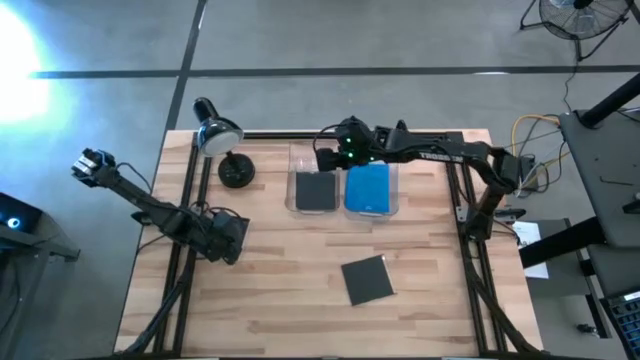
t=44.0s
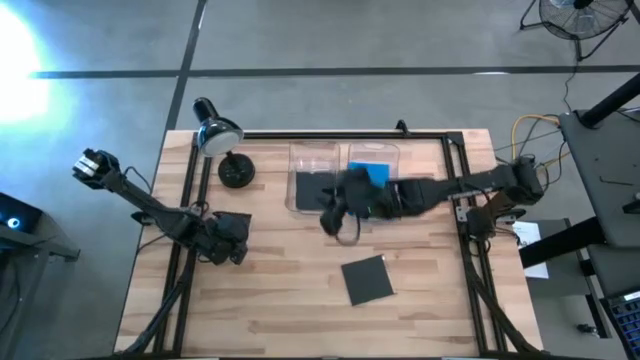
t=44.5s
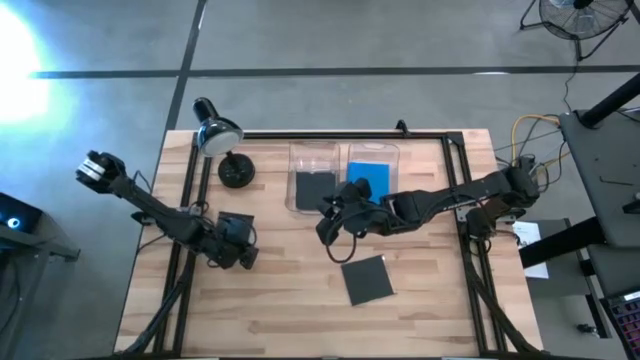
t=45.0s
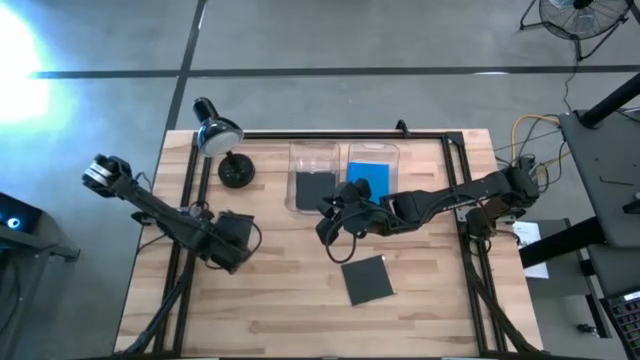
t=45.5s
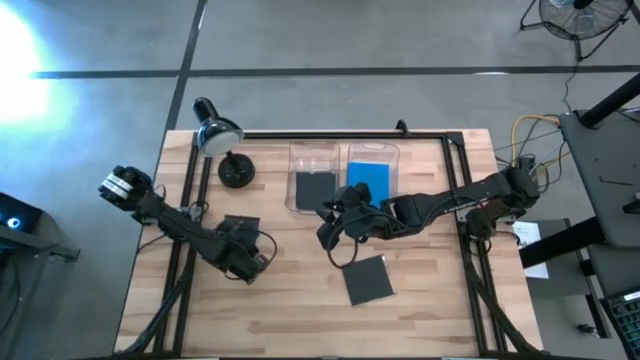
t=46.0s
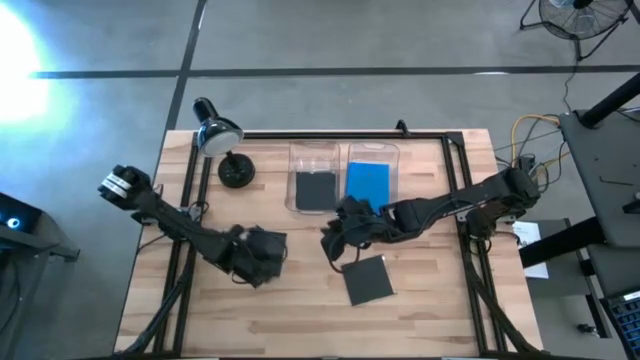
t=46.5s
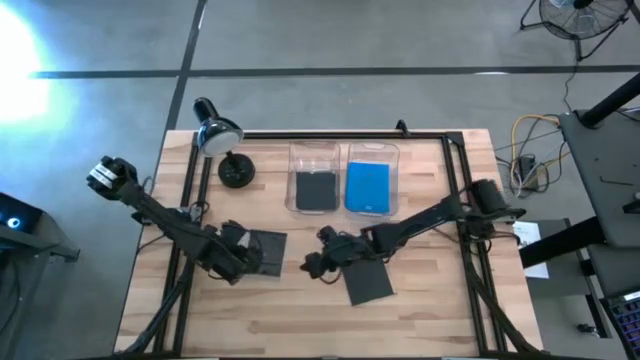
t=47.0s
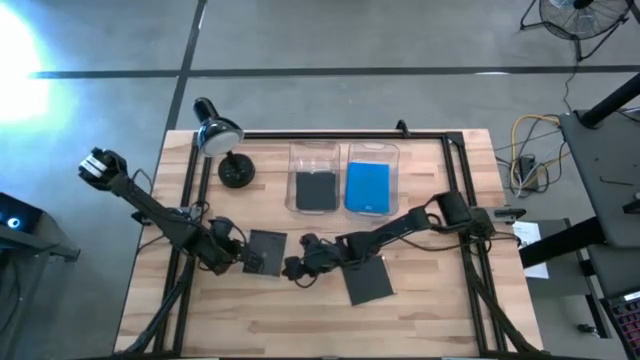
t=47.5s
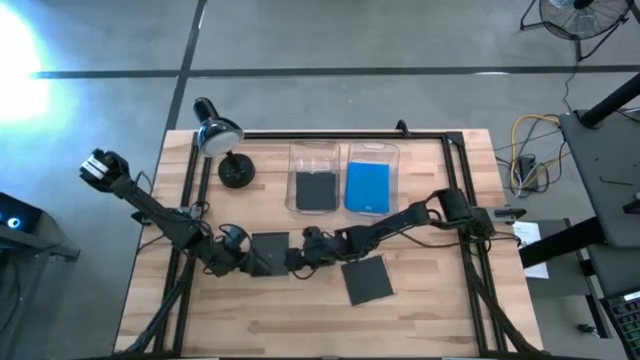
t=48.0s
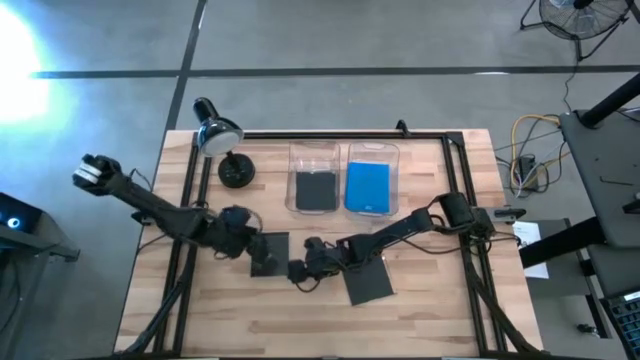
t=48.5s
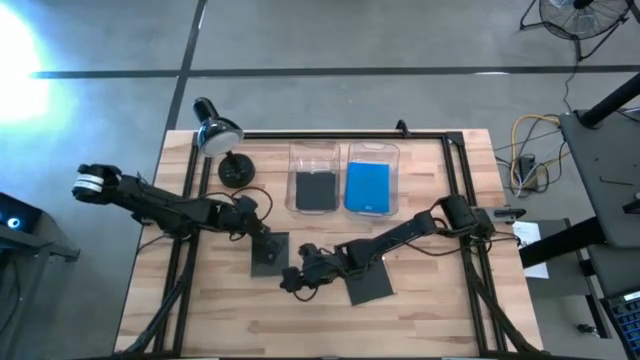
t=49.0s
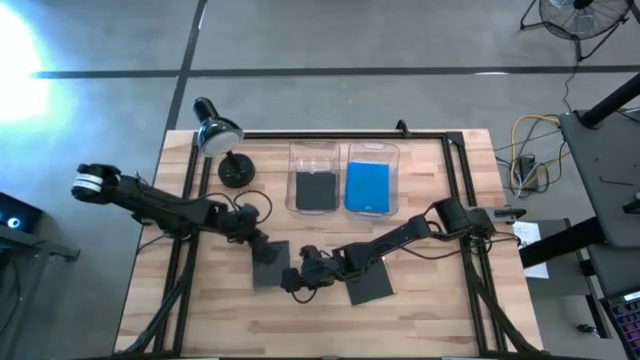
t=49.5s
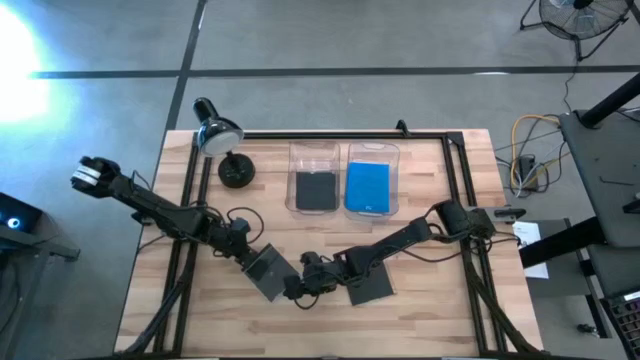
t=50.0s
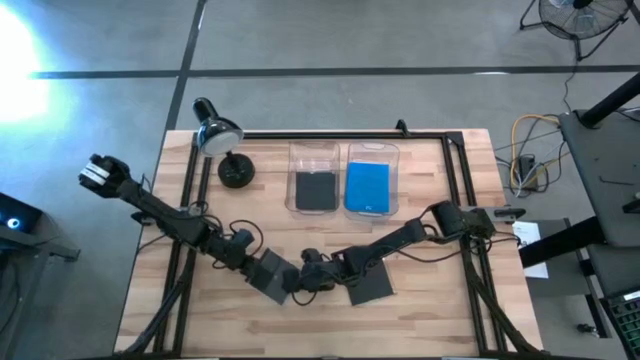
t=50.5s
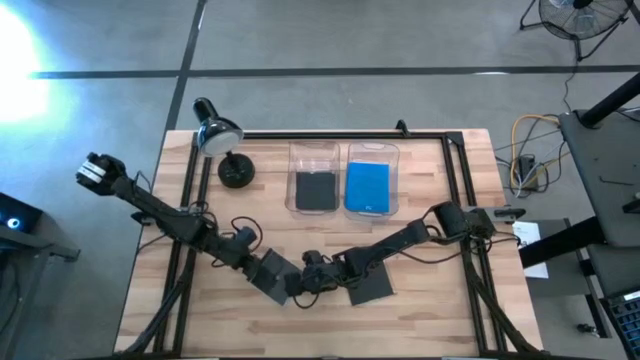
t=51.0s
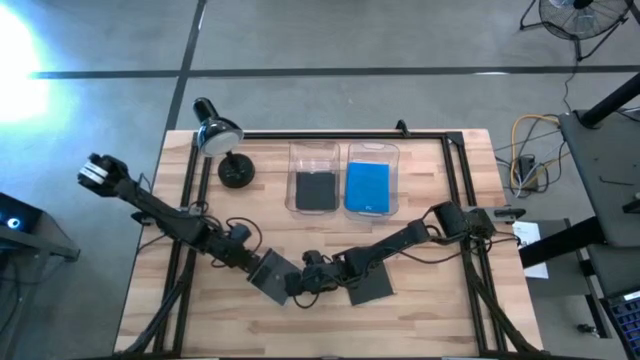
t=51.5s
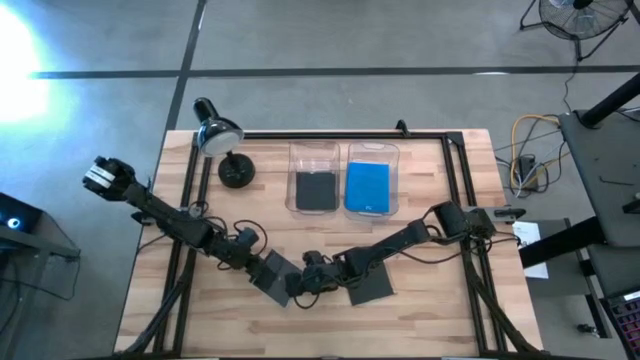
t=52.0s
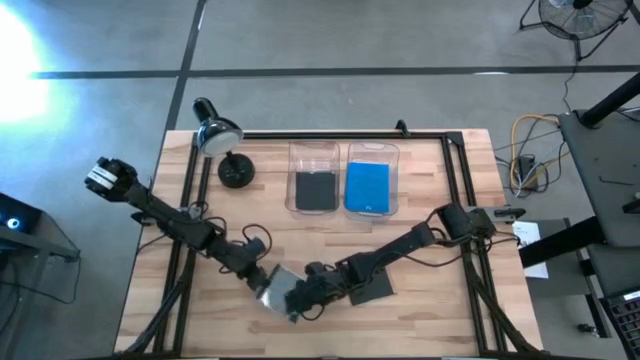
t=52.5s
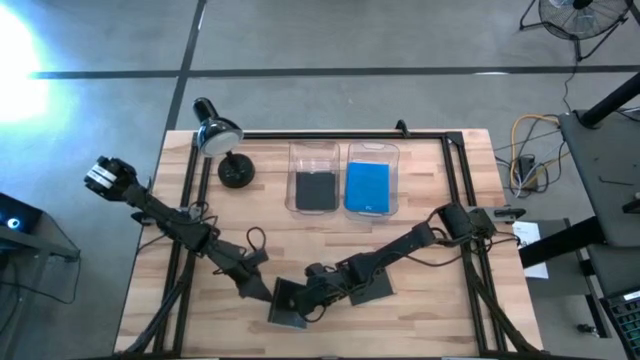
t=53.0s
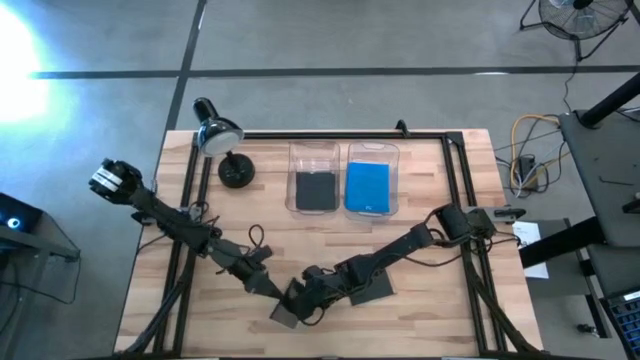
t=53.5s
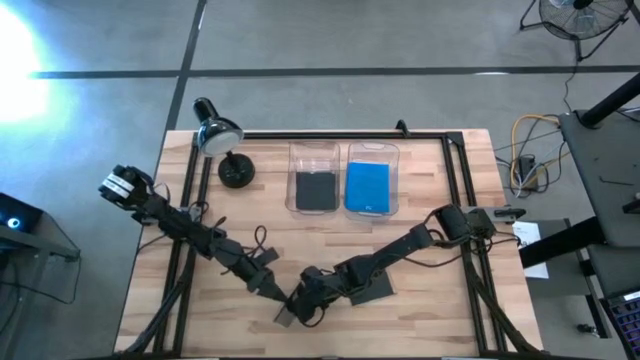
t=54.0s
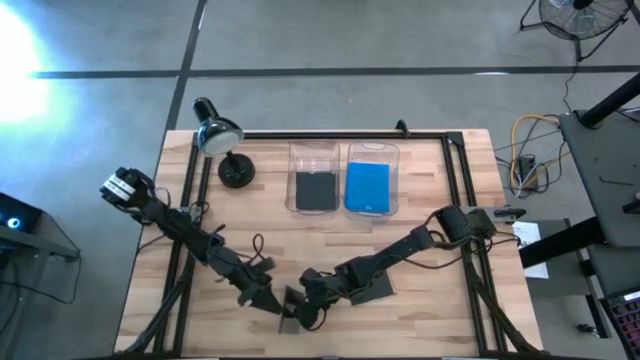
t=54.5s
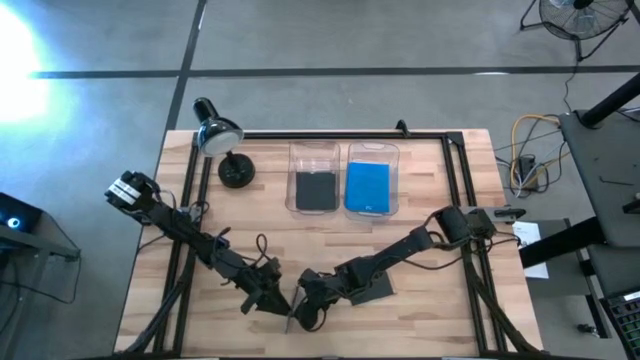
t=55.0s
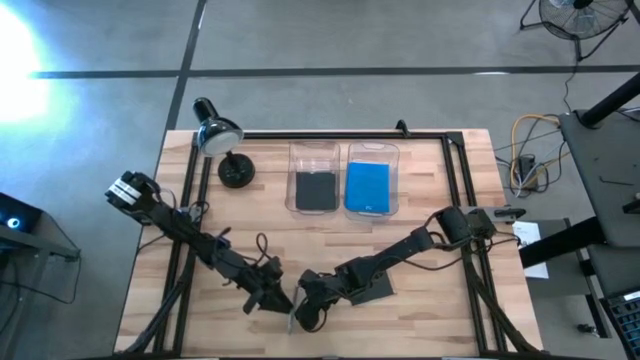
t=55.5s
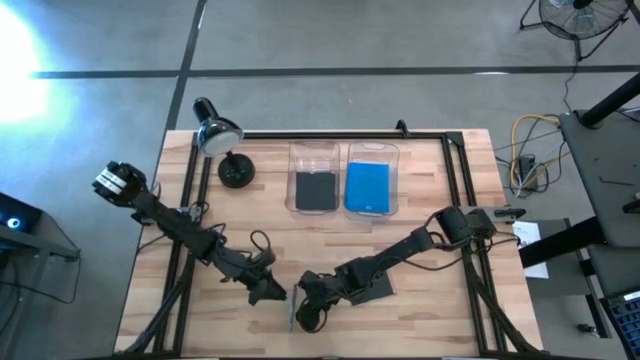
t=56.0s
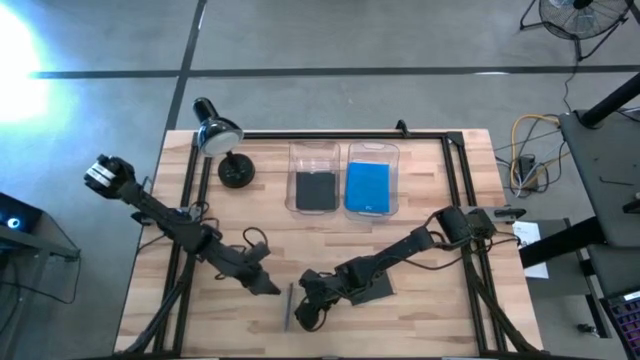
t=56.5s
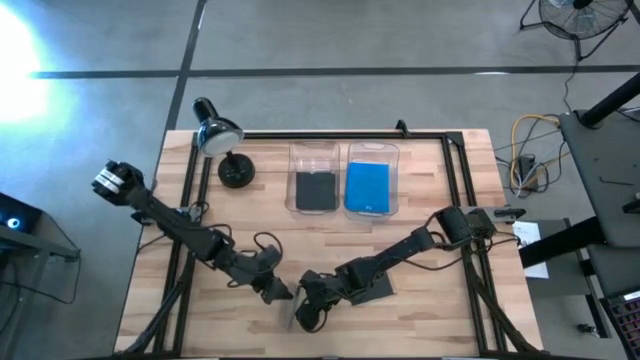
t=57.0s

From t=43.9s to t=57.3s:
Task: Pick & place jewel cases by type
Put the black CD case into the left transparent bin

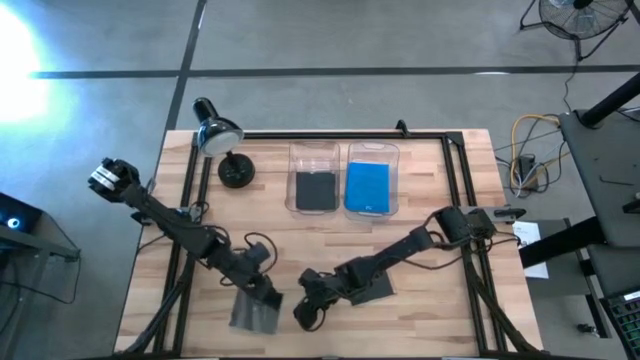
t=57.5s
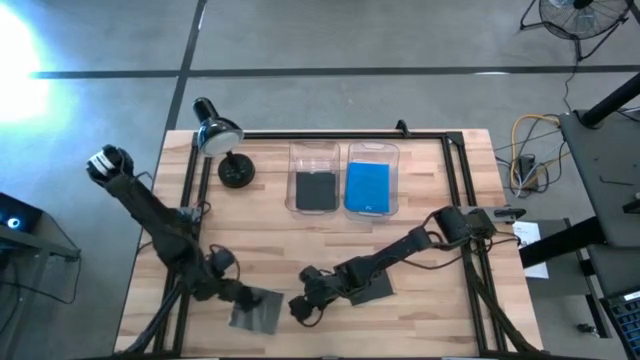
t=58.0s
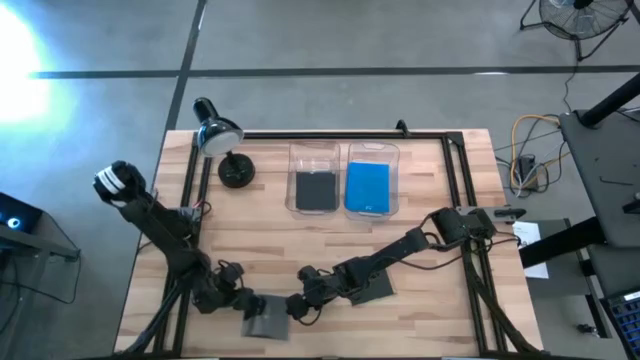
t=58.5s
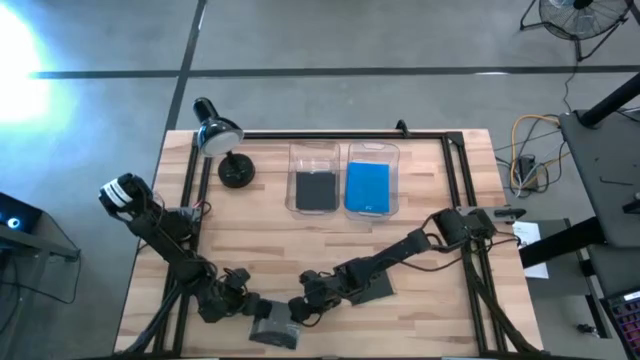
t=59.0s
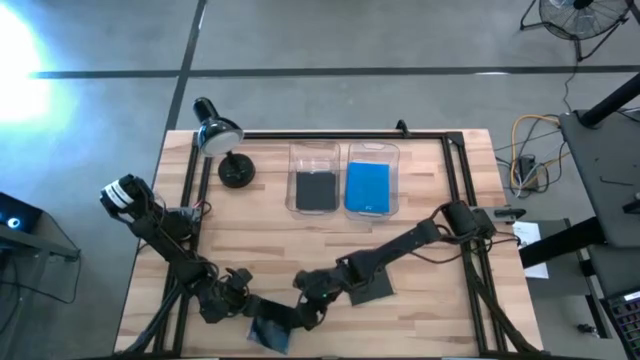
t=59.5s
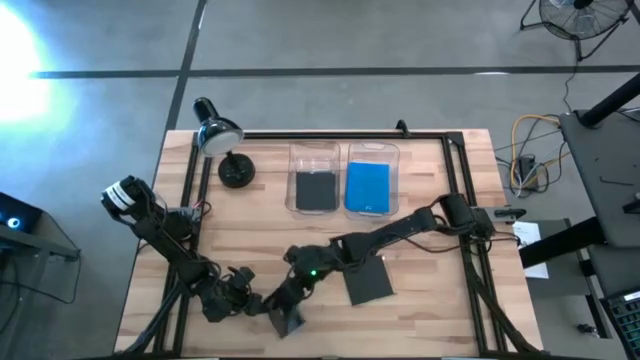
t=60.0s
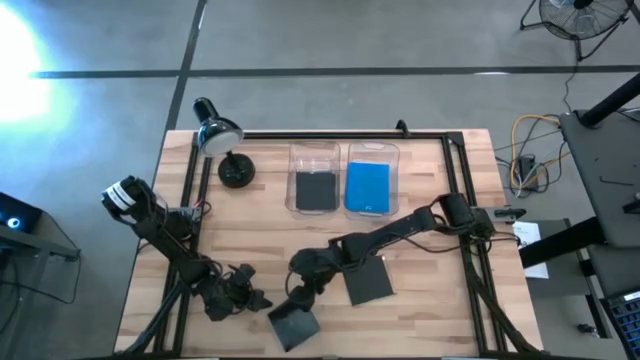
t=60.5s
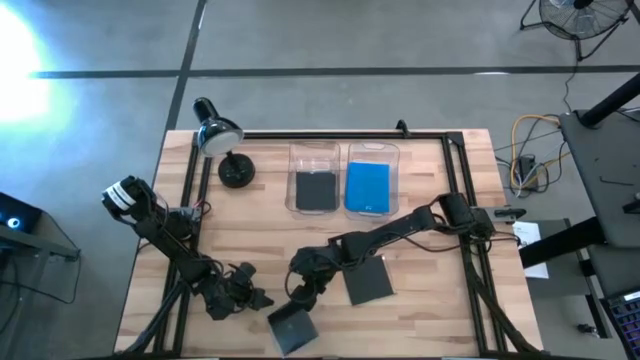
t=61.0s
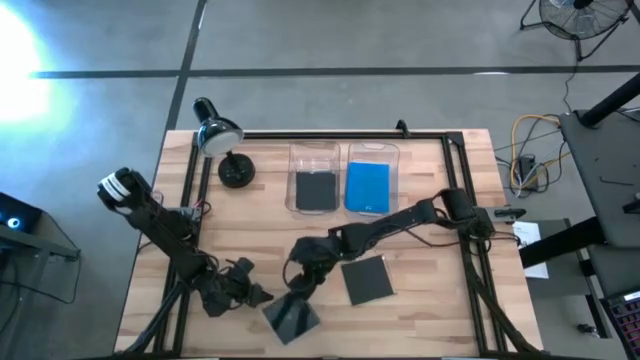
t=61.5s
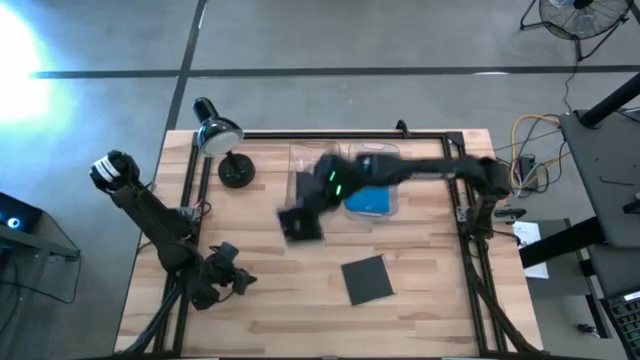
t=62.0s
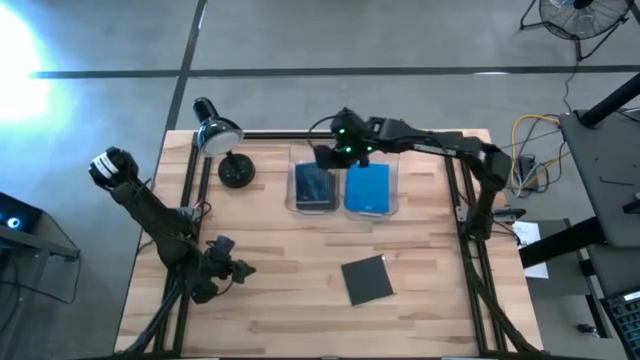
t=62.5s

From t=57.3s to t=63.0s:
Put the black CD case into the left transparent bin

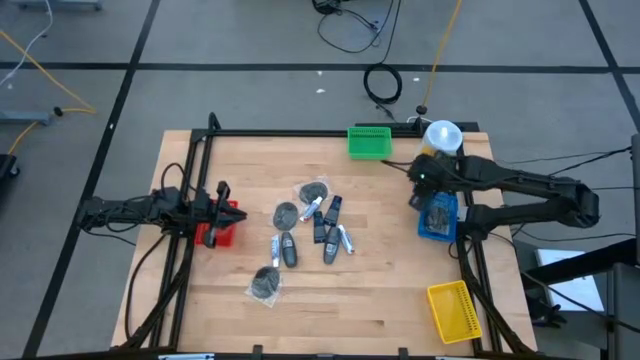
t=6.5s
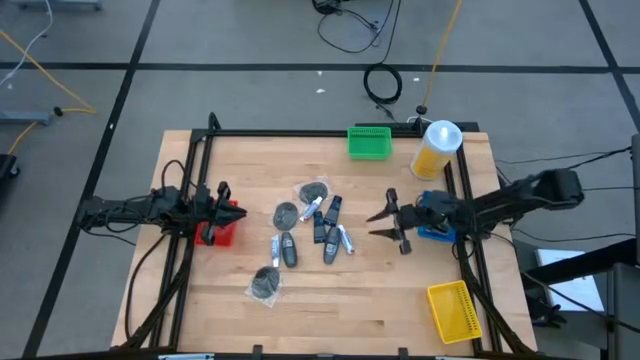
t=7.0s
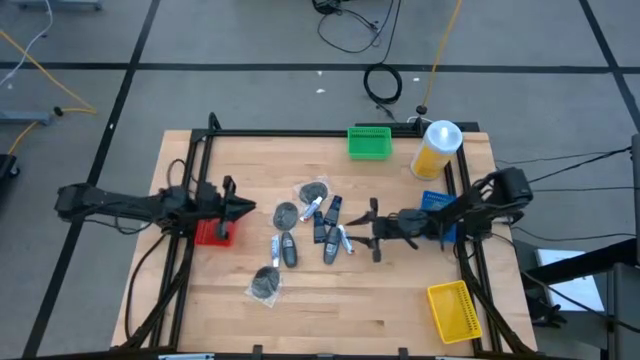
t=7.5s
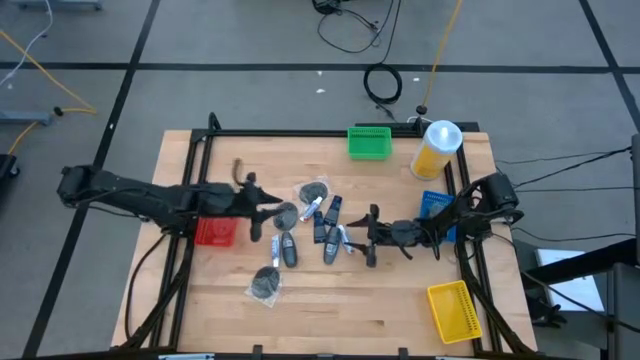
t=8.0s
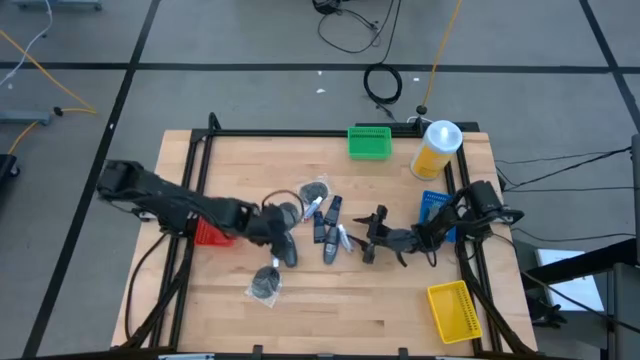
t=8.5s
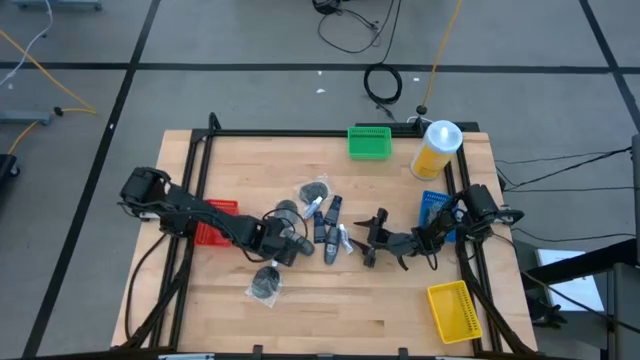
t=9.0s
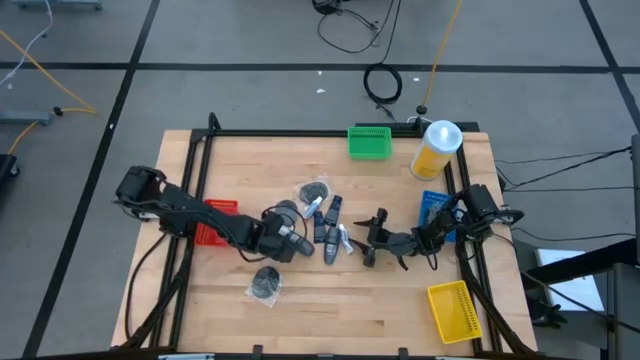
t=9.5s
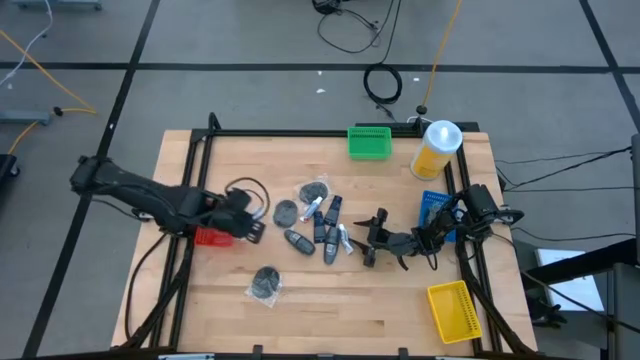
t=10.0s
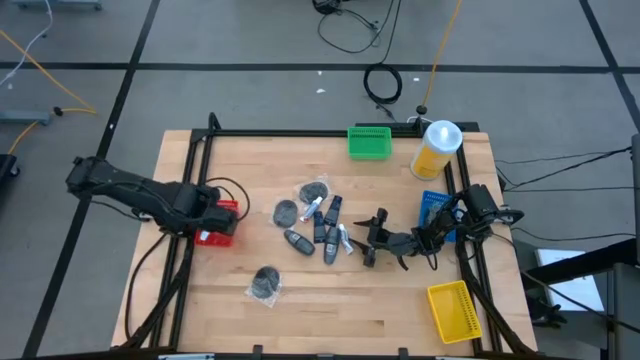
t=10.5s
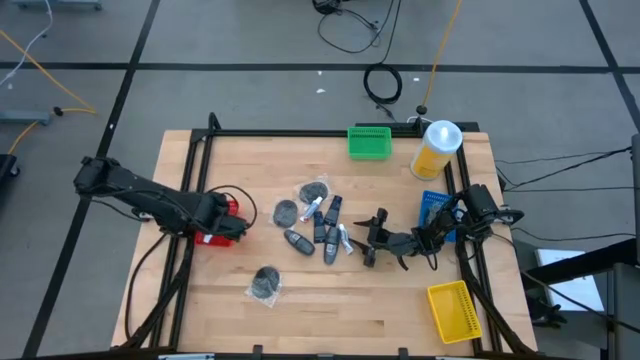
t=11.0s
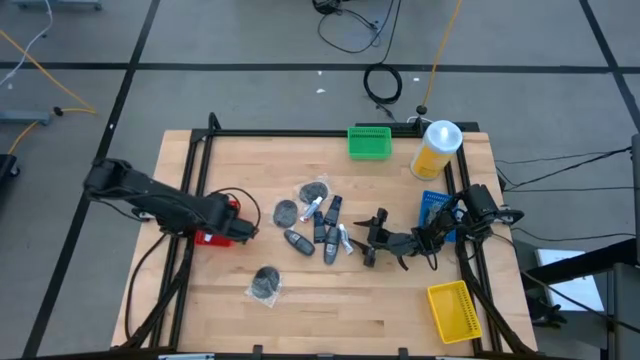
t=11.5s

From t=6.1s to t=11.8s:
Task: Pick & Place Travel size toiletries
Put the white toothpaste into the red bin
